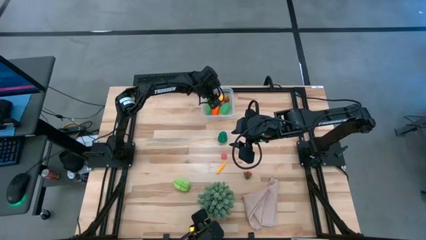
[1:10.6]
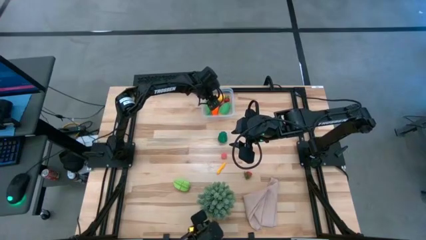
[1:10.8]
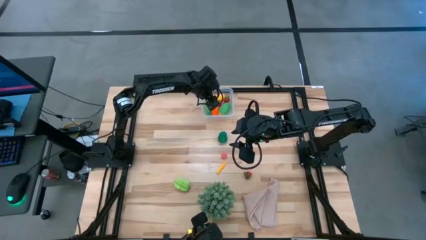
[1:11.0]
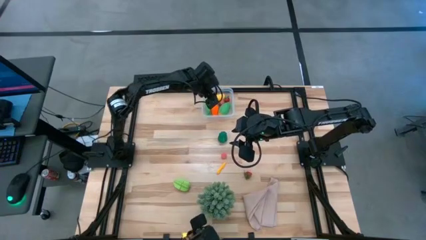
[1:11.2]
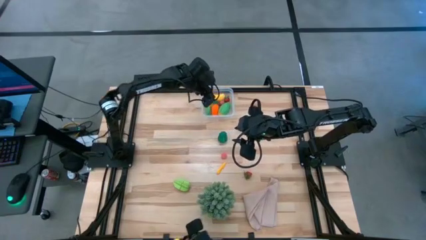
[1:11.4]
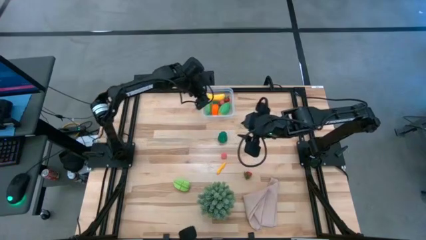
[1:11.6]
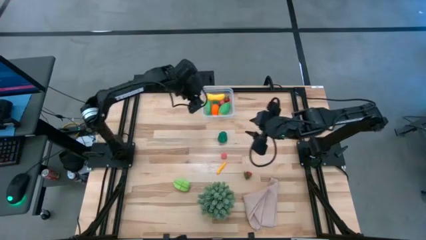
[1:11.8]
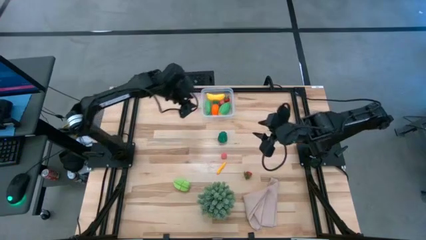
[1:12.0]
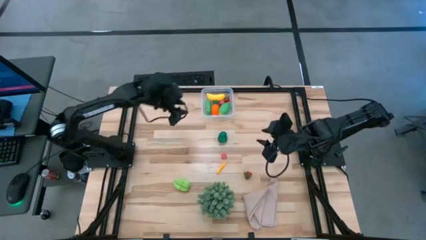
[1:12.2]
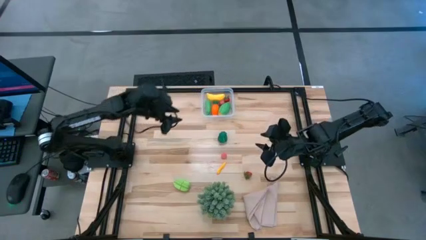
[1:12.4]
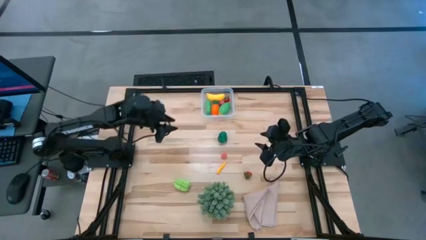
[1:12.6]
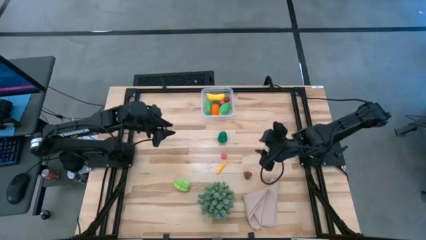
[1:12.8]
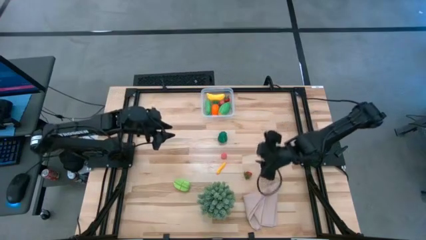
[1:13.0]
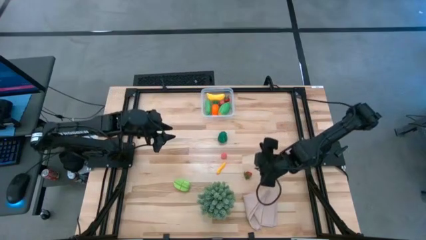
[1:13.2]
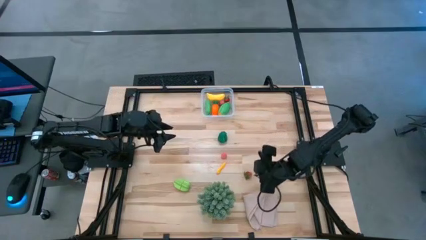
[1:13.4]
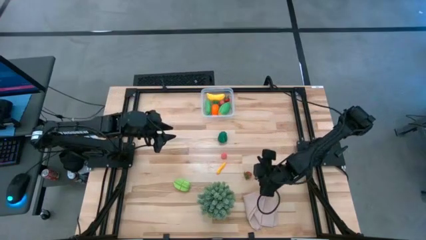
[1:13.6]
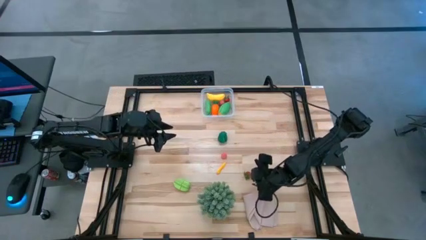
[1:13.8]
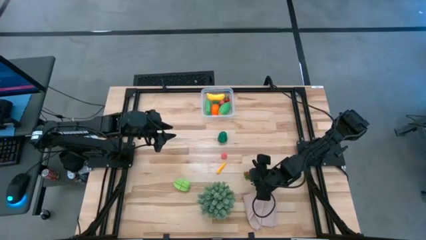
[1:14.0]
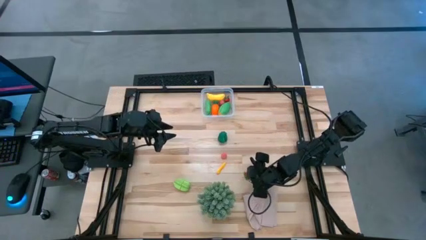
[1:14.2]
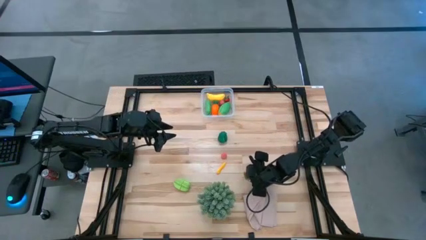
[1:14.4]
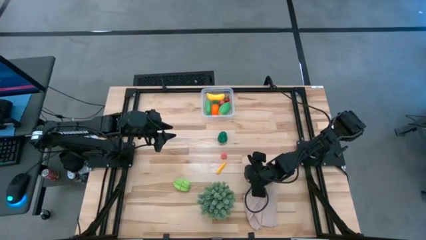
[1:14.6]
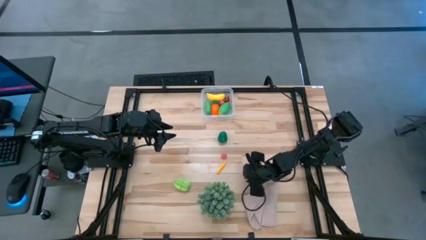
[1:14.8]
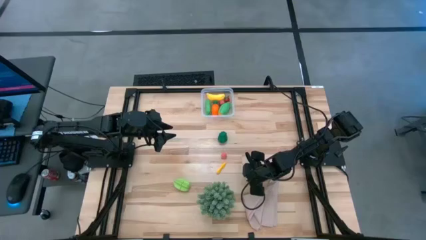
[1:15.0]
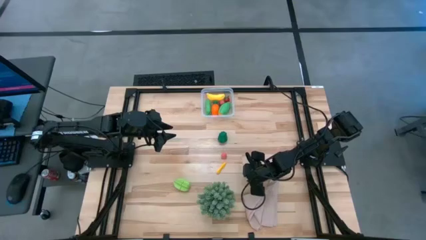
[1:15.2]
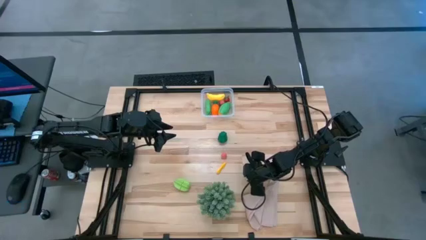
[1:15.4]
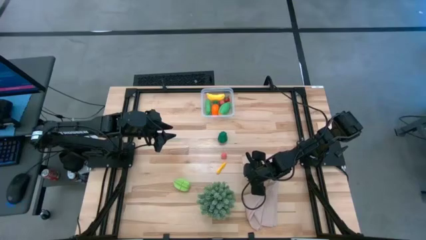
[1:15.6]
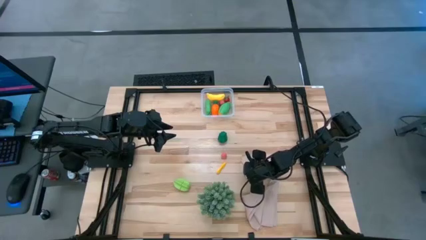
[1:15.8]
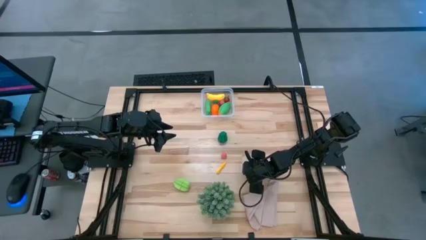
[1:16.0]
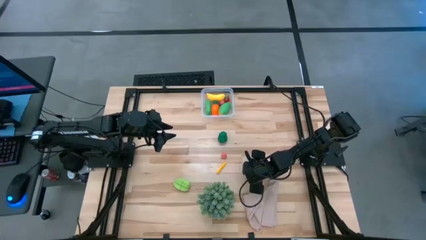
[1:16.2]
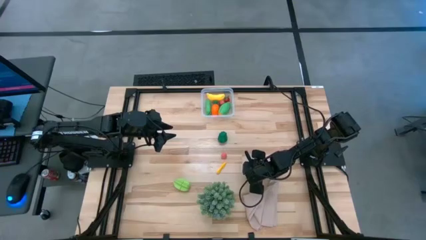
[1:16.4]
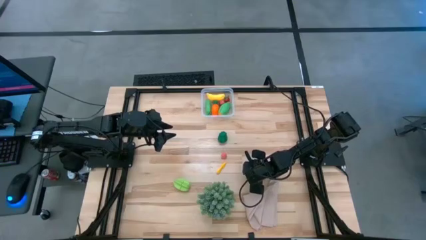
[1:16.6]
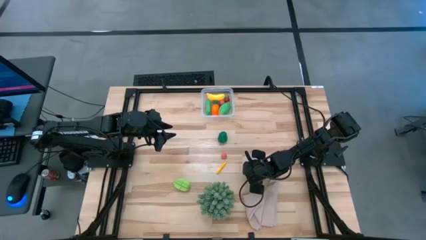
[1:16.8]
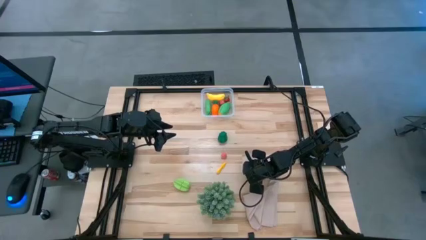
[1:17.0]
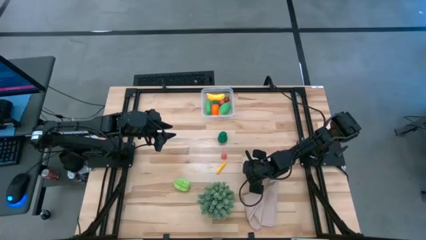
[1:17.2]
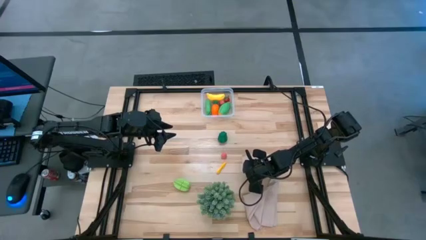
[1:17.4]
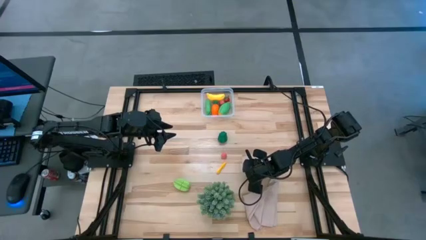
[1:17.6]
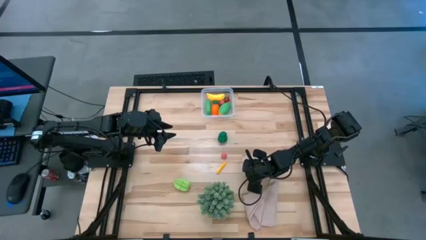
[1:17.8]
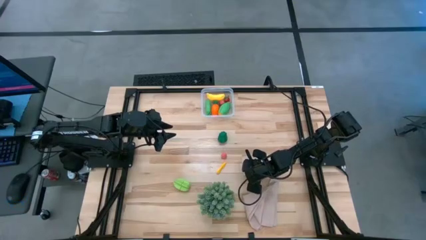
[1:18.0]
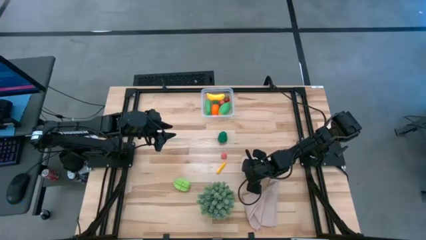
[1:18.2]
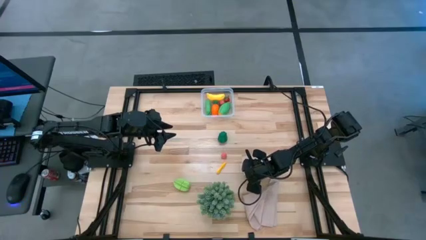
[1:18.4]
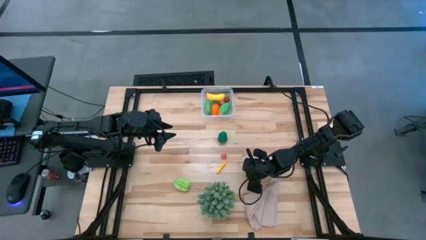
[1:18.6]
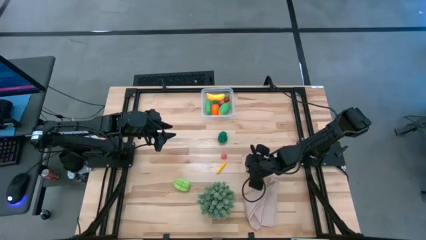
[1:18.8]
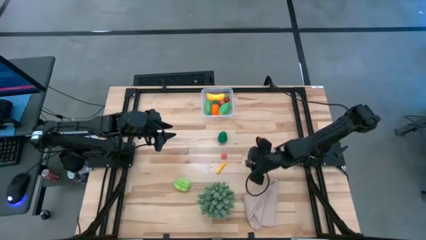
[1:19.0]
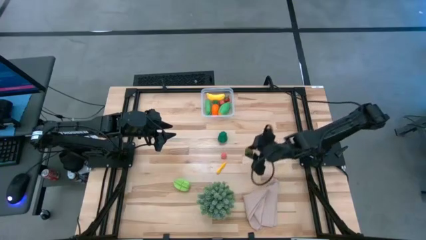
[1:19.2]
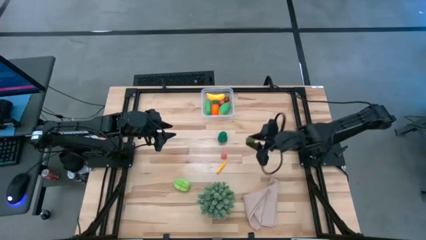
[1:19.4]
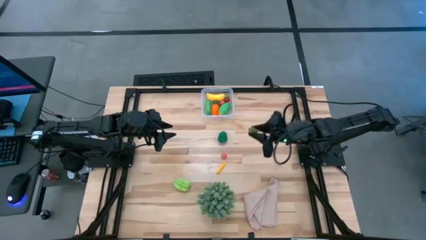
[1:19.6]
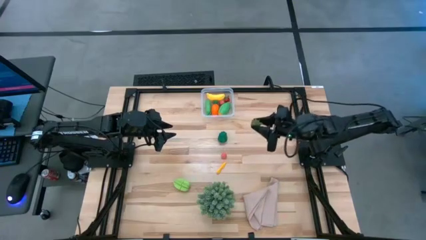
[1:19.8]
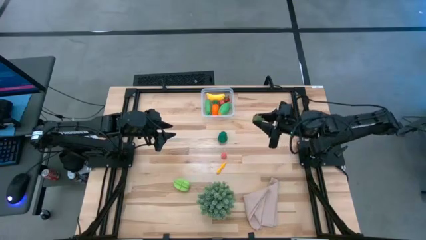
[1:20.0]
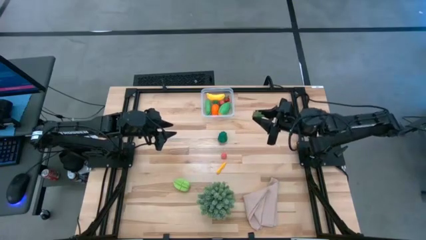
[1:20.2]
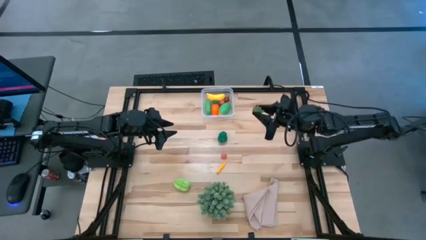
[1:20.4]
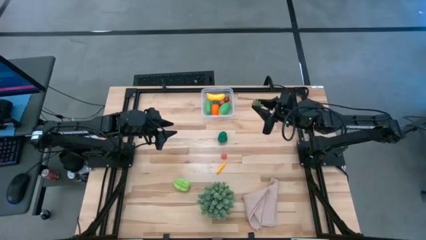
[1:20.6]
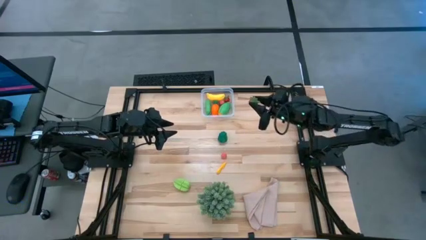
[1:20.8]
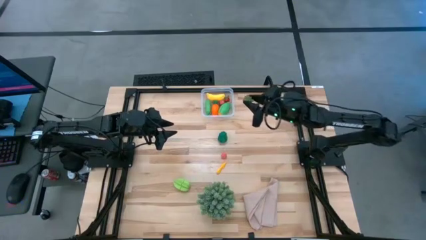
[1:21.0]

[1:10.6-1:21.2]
Task: Pick and placing Produce into tupperware
Put the strawberry into the transparent bin

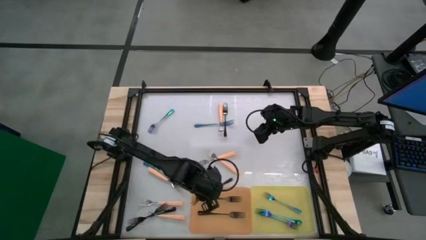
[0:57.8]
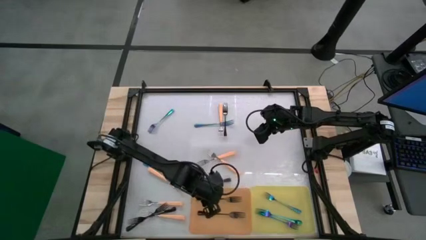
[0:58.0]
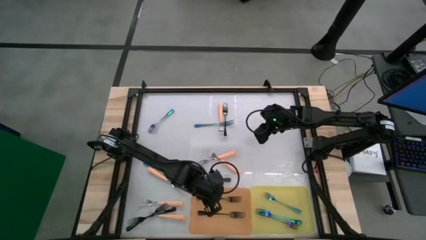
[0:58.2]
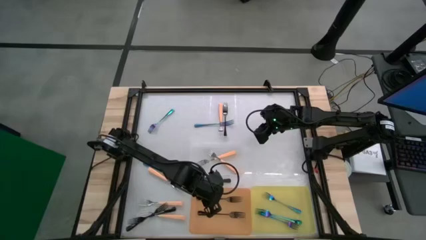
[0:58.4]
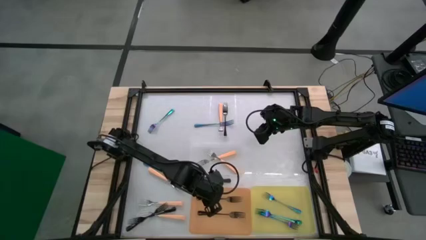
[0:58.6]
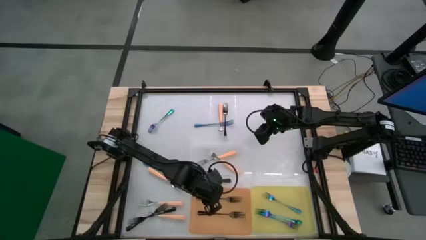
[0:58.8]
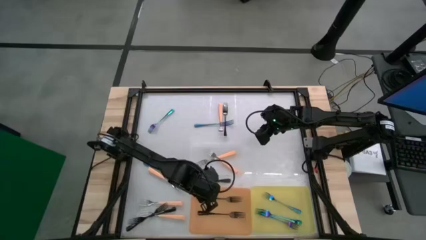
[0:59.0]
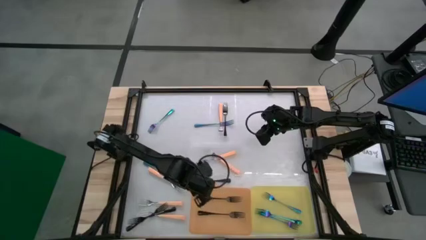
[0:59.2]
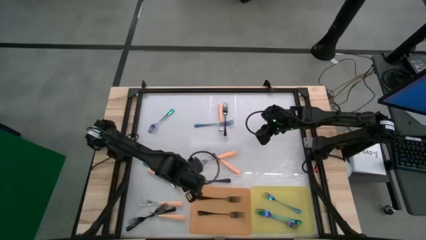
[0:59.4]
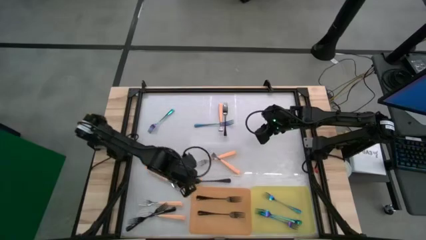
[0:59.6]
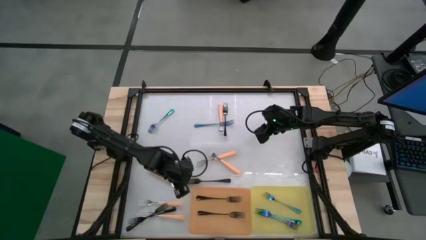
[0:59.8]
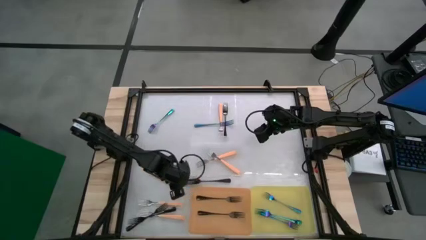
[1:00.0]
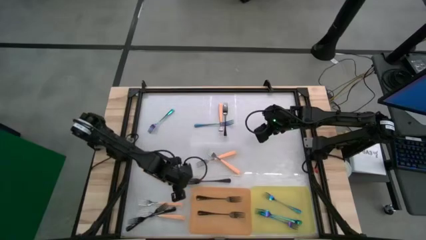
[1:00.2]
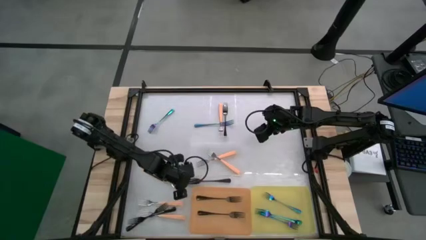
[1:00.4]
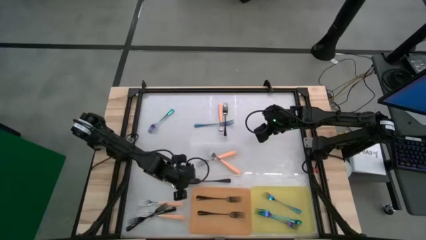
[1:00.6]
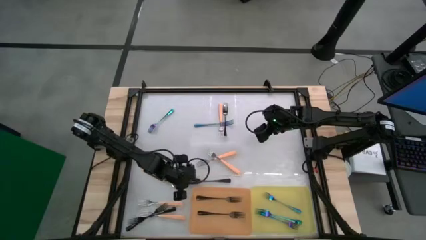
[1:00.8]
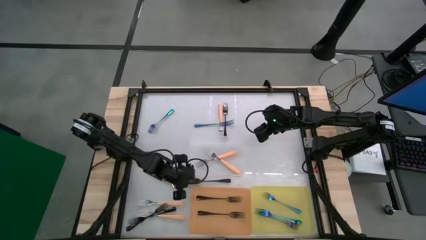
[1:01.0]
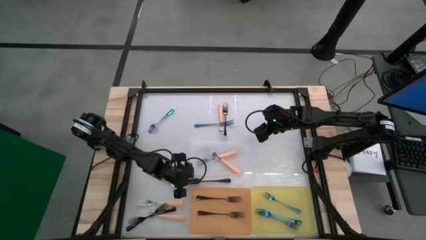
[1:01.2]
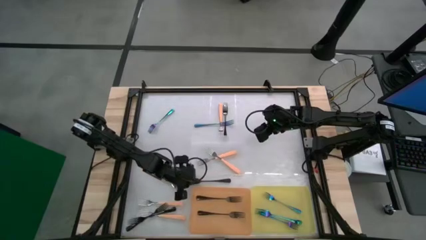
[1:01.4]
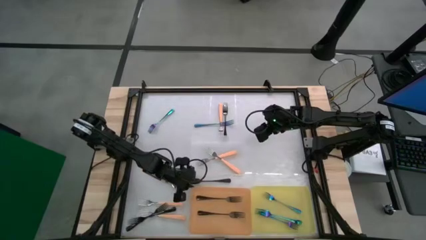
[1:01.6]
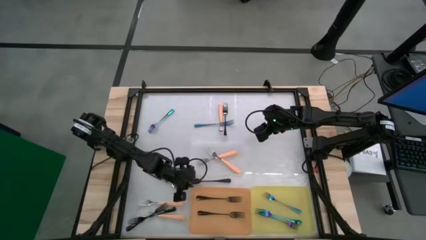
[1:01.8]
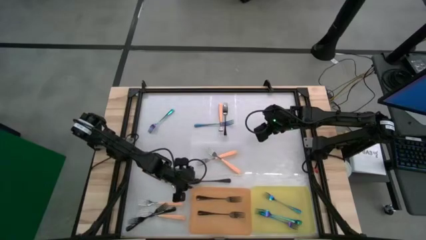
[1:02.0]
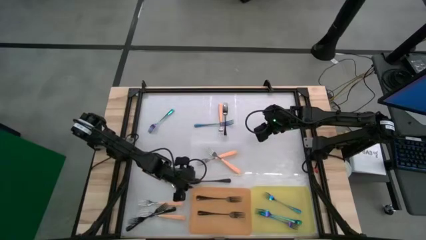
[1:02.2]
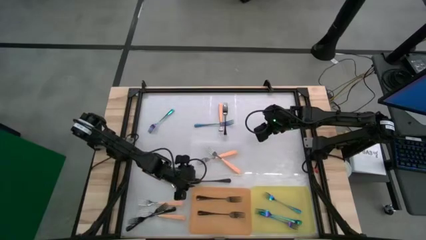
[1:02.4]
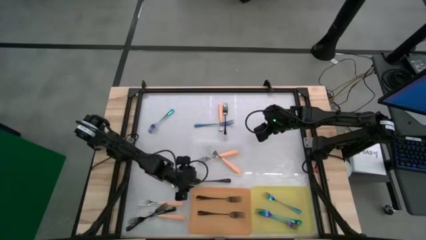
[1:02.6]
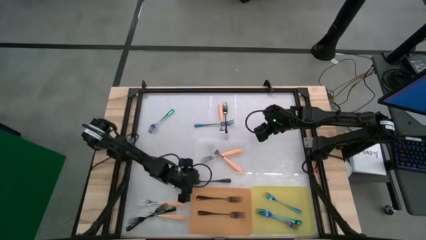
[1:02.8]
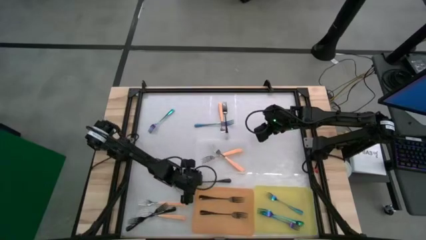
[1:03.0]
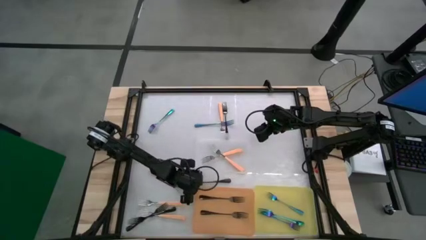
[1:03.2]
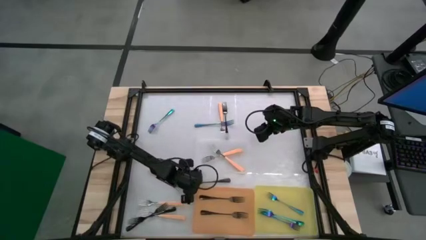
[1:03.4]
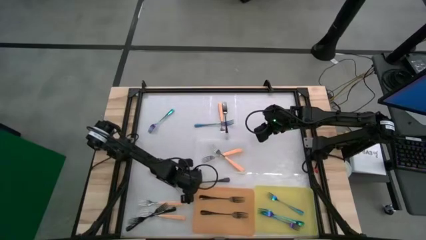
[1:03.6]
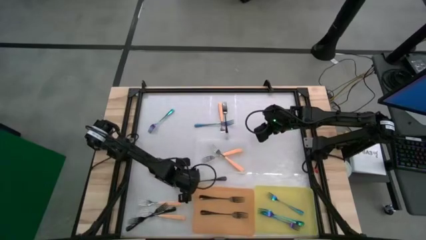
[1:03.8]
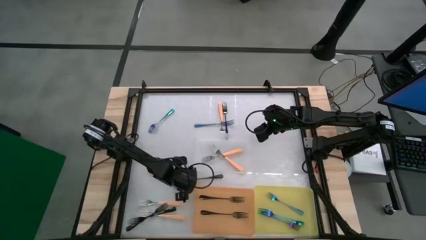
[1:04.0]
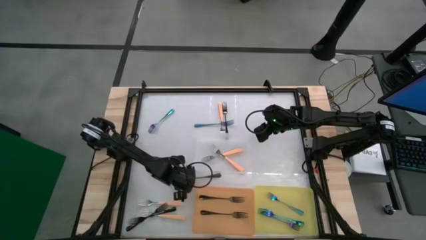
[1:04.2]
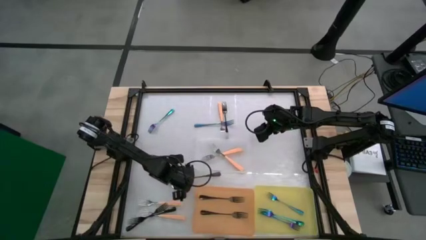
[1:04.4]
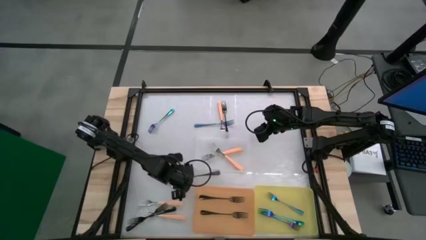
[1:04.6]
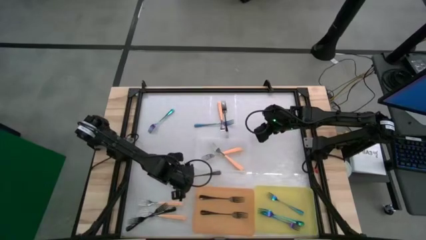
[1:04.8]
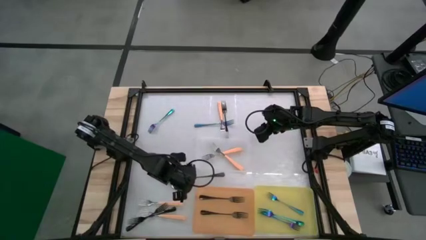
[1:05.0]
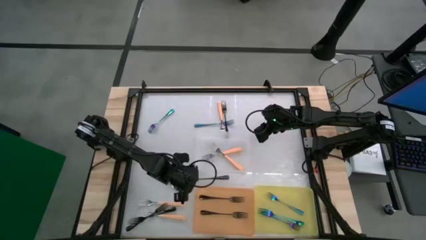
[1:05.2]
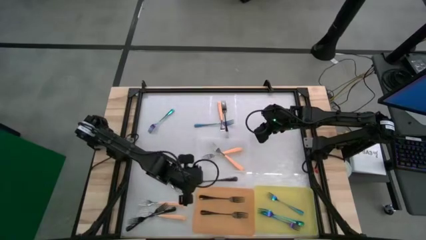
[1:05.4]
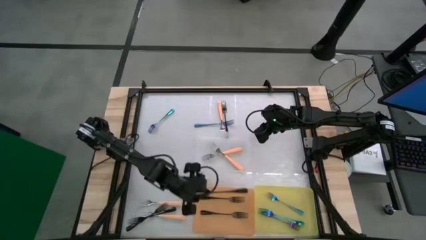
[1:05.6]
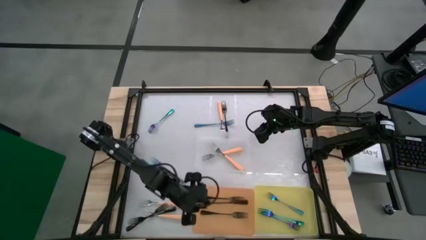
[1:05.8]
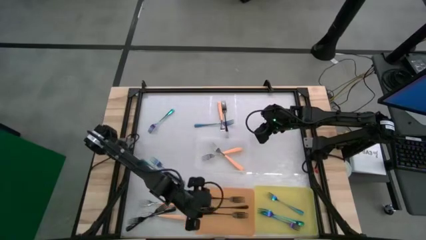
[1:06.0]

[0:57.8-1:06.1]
Task: Sort silverware by color (type)
Put the black fork into the orange bin
